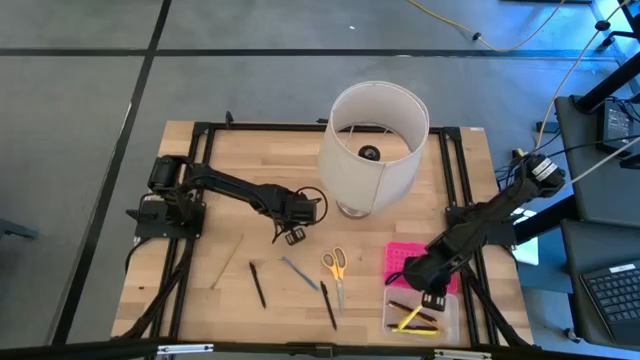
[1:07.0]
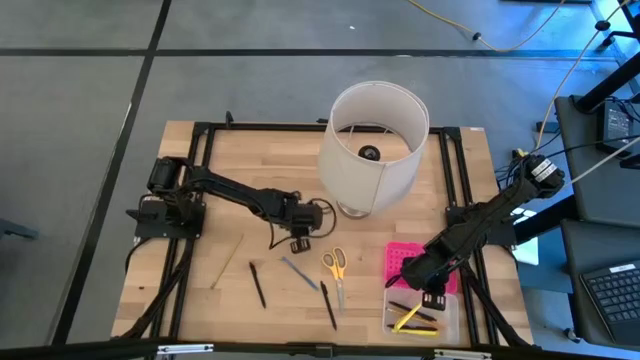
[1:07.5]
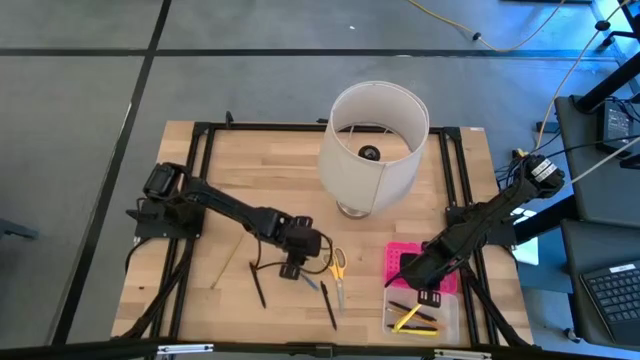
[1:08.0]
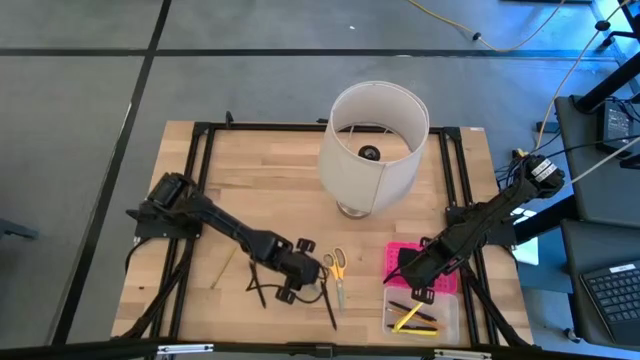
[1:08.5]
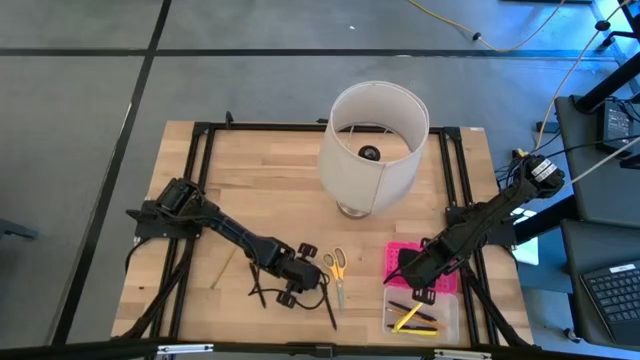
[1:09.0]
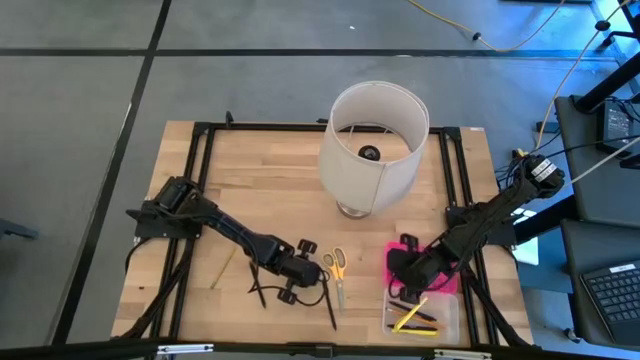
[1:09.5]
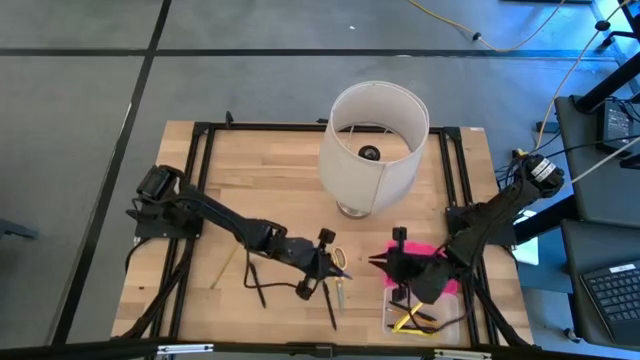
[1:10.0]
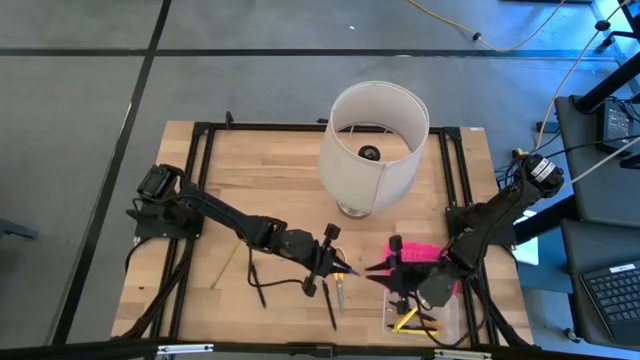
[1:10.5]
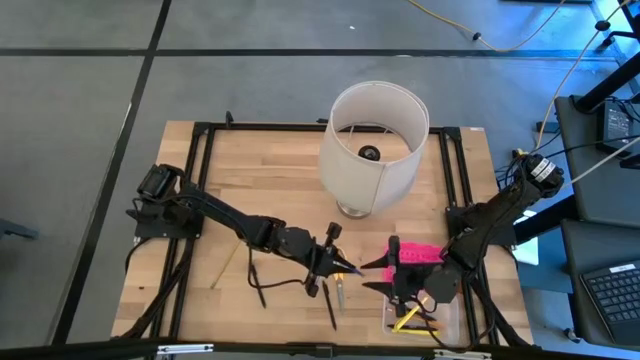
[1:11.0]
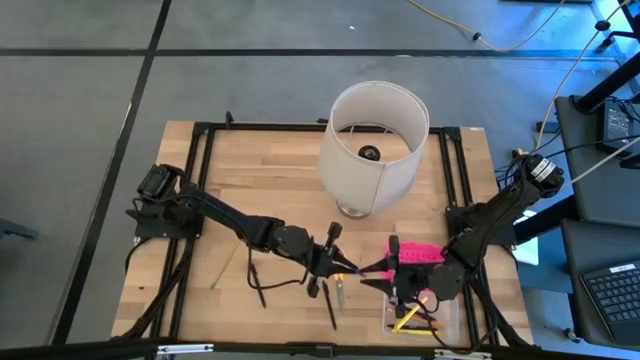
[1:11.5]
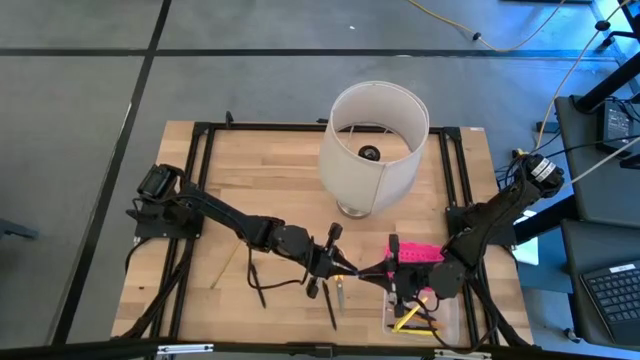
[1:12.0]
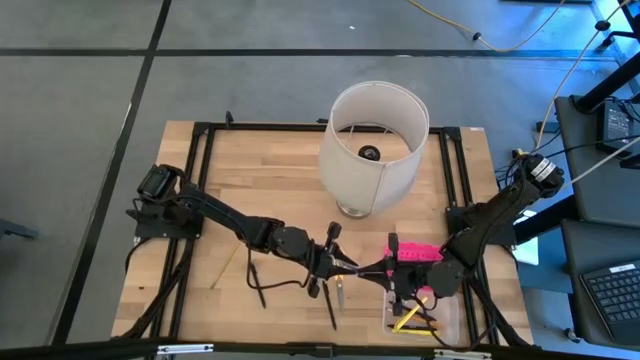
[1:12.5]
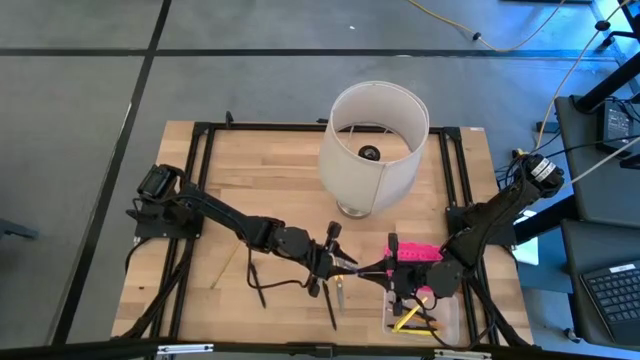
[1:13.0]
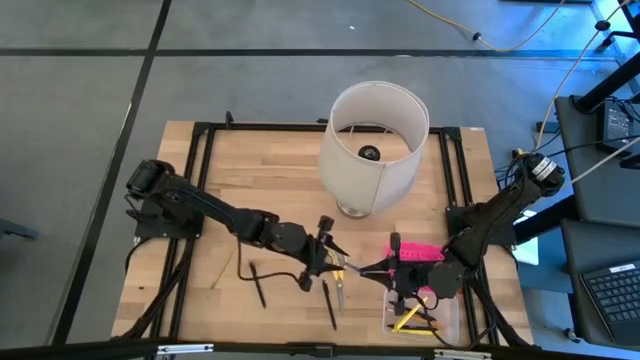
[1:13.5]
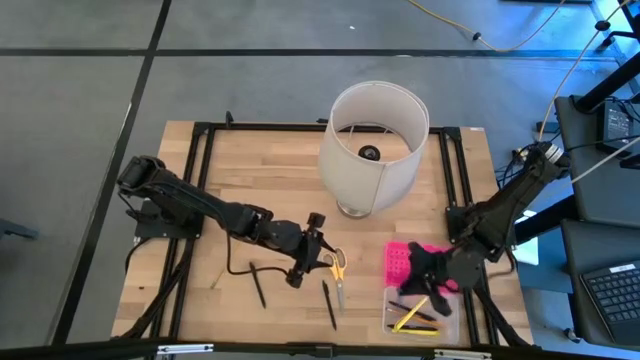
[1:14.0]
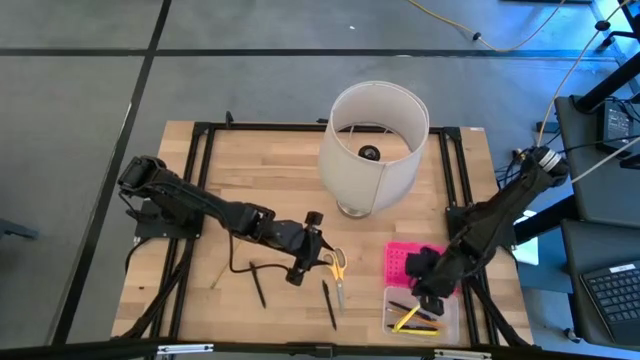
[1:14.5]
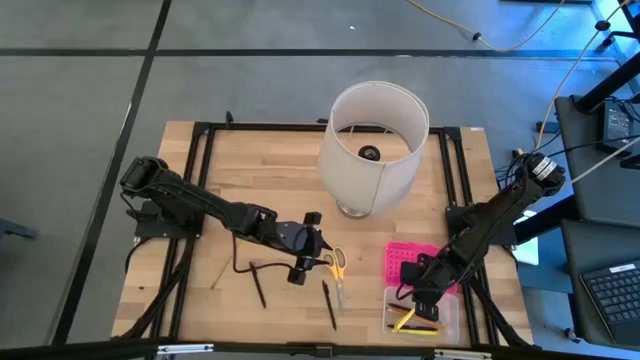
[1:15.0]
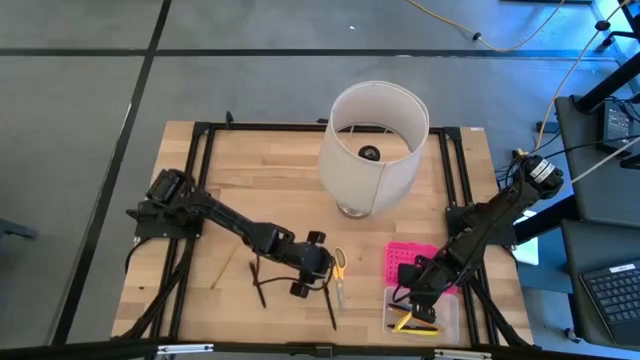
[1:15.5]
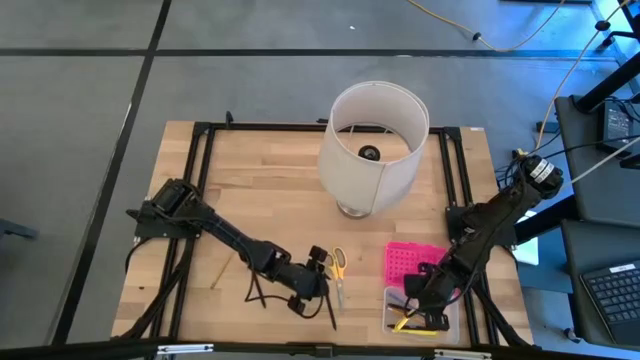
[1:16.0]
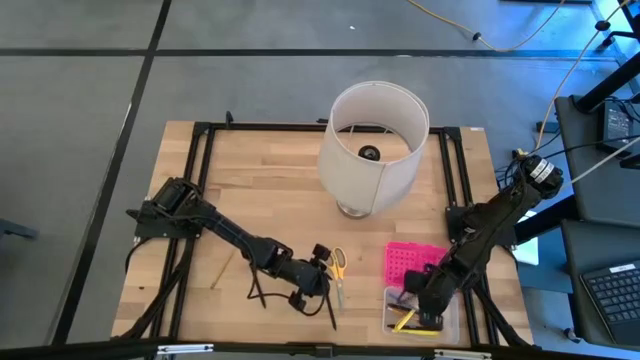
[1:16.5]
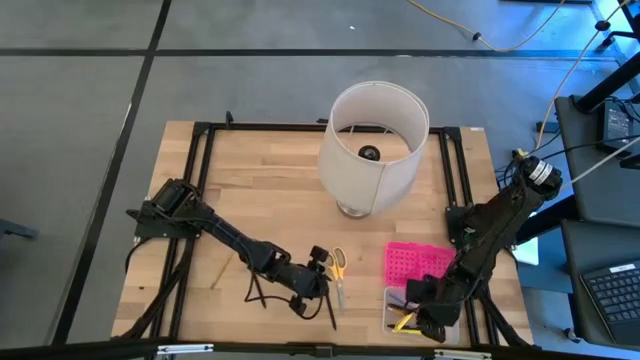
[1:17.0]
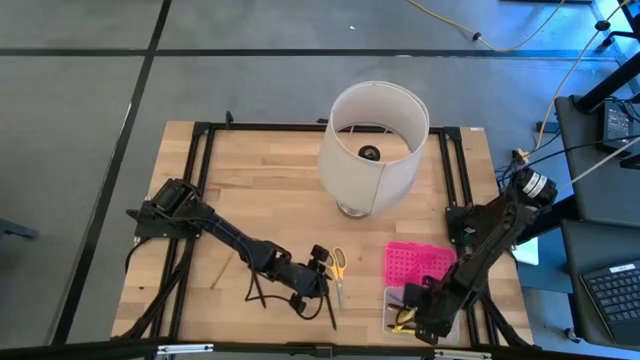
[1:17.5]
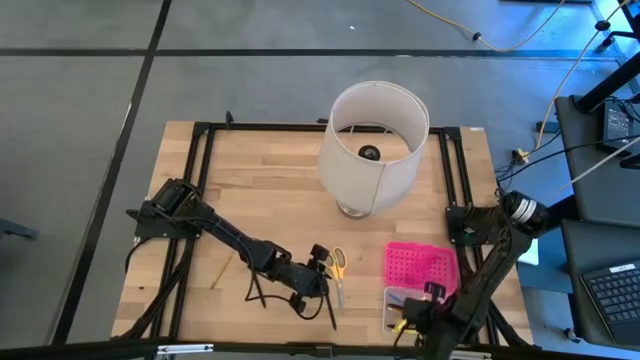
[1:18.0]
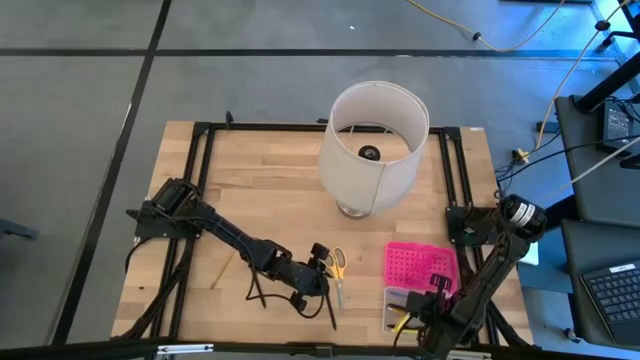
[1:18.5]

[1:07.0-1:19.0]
Task: Pick & place school supplies into a supply box
Put the blue pen into the supply box

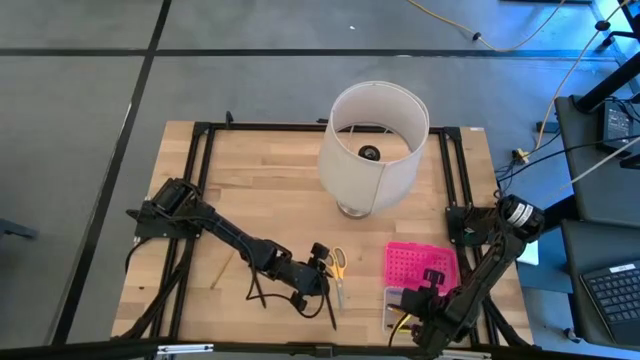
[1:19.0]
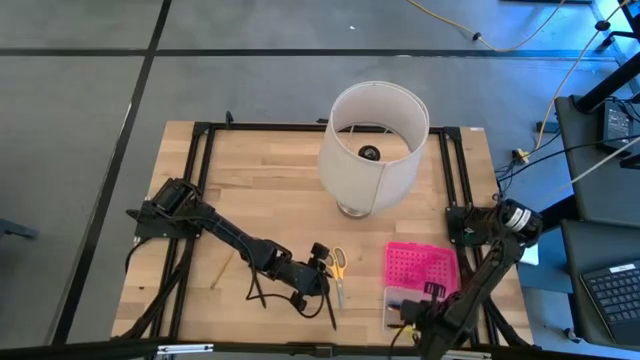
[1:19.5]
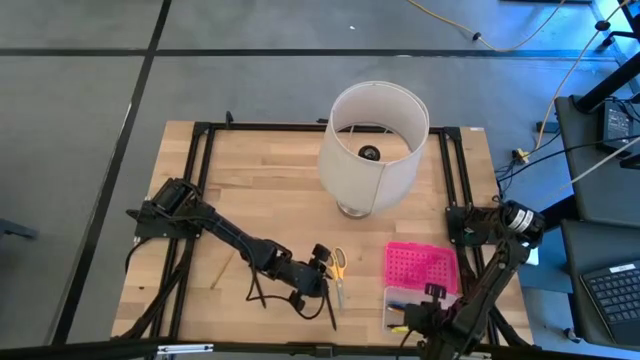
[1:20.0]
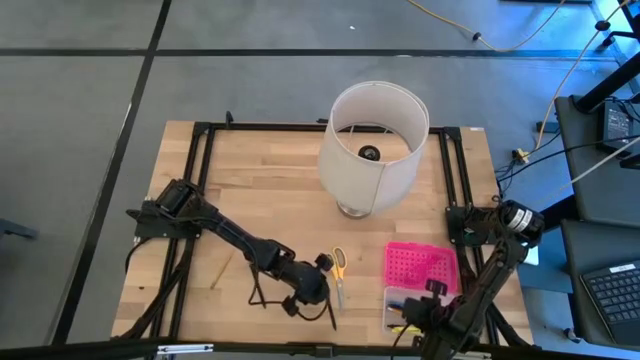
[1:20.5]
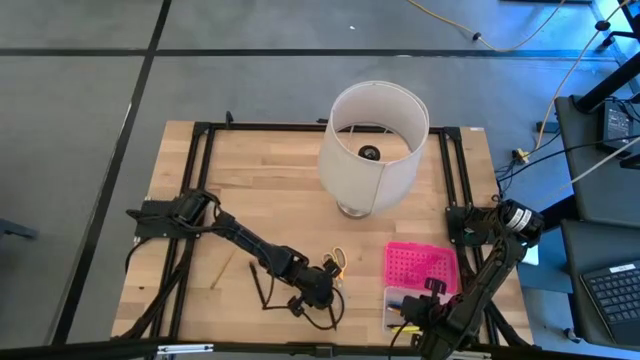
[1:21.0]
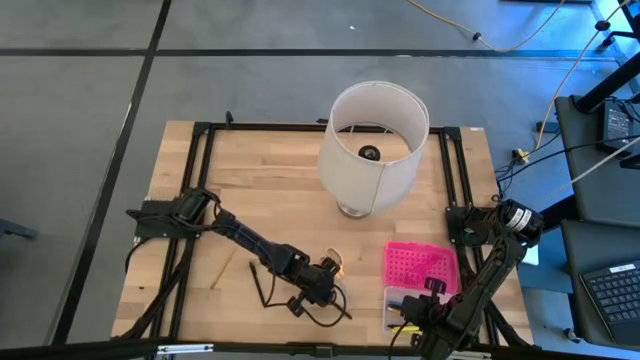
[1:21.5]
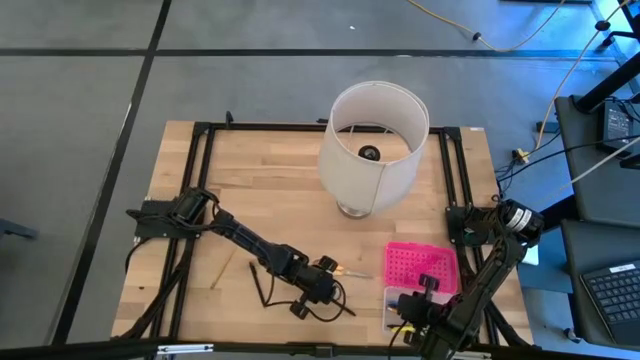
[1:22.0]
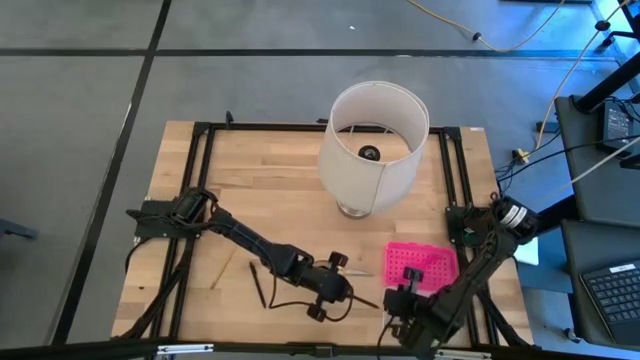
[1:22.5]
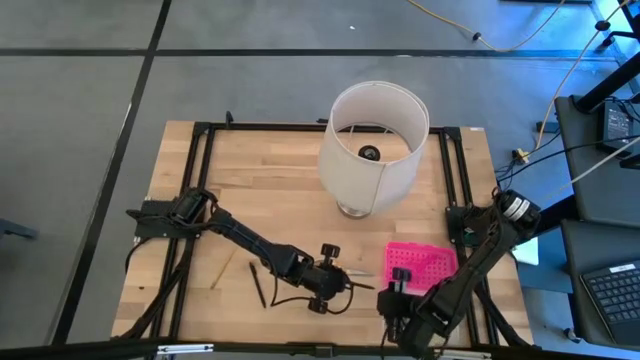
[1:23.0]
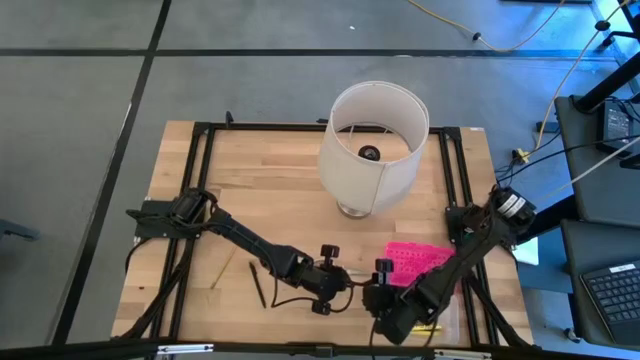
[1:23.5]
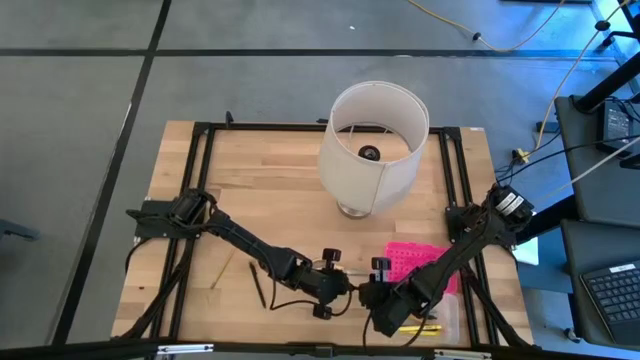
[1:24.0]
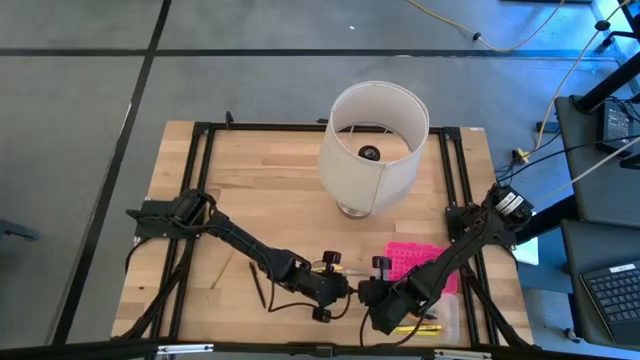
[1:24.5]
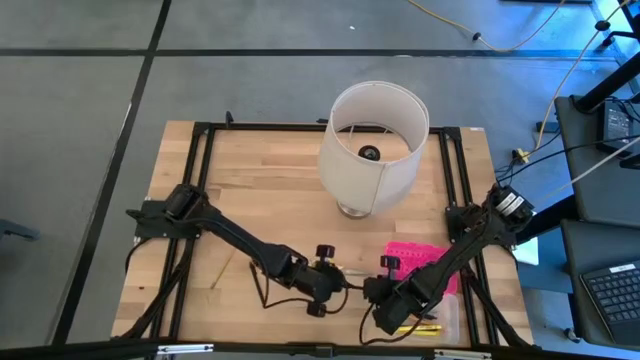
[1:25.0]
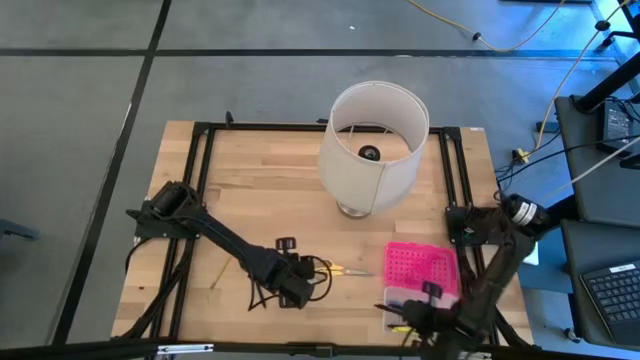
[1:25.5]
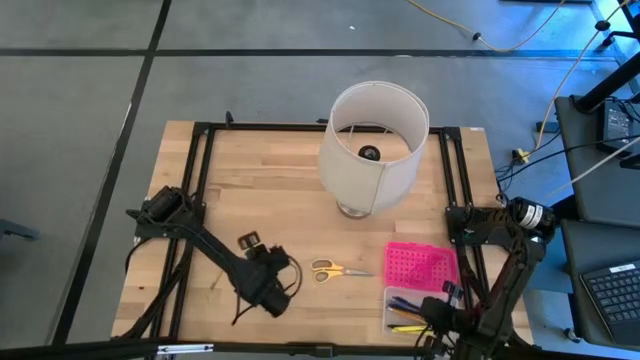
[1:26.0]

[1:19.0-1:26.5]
Put the black pen into the supply box

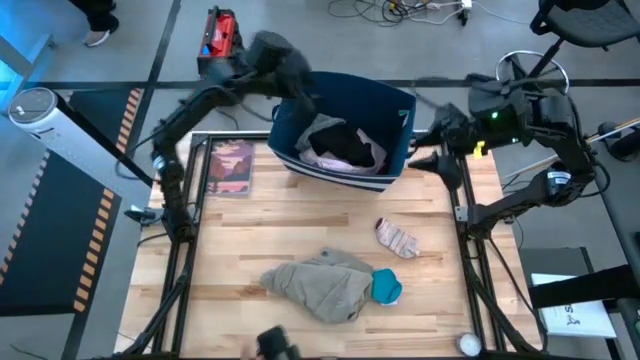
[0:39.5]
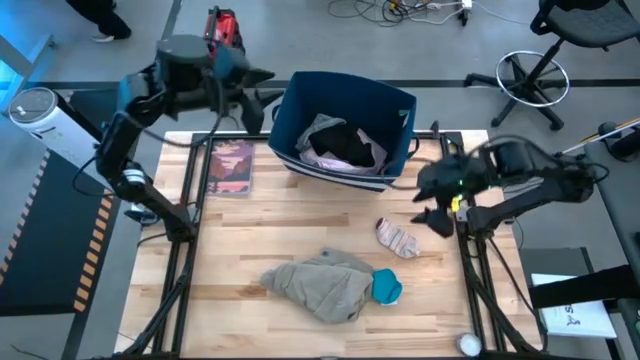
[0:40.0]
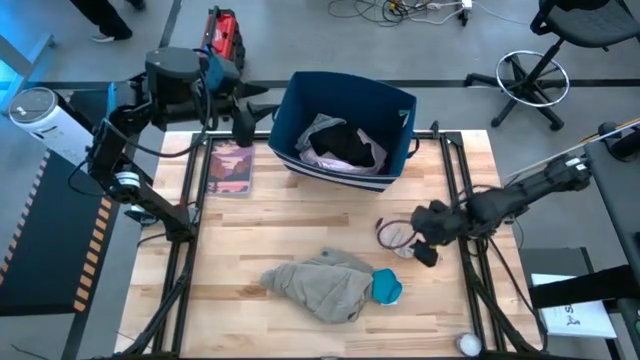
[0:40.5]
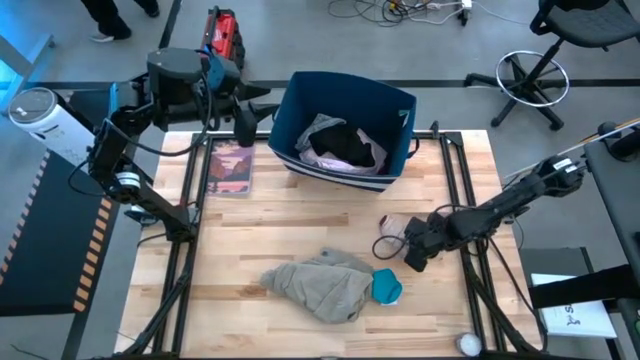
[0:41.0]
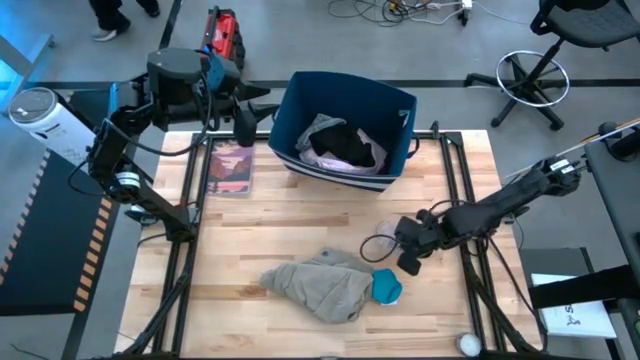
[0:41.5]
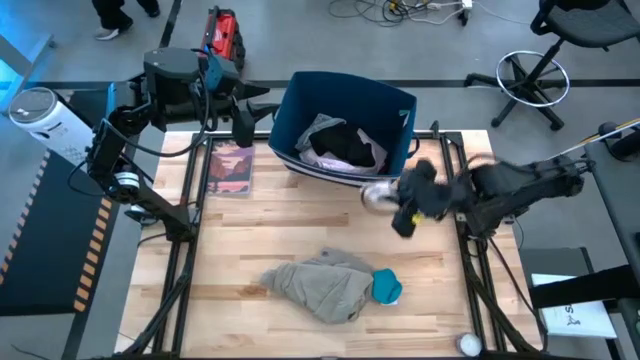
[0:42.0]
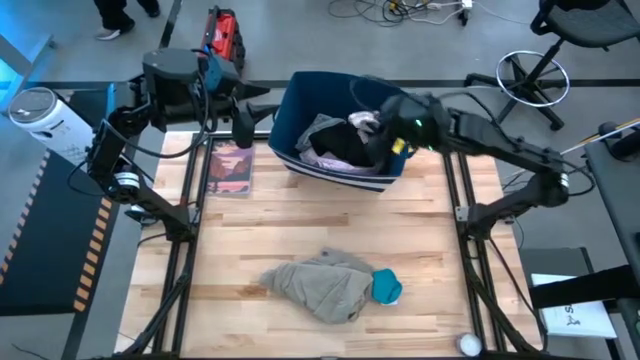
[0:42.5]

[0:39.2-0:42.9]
Task: Sort clothes
Put the white sock into the blue laundry bin
